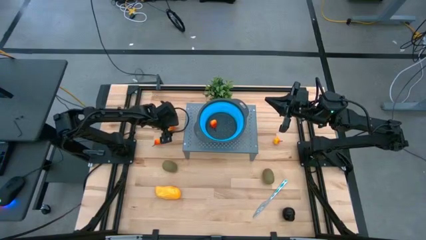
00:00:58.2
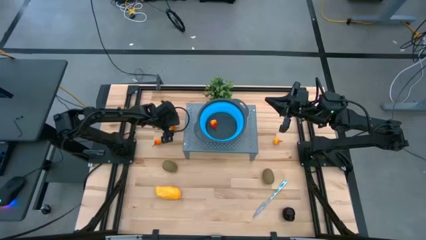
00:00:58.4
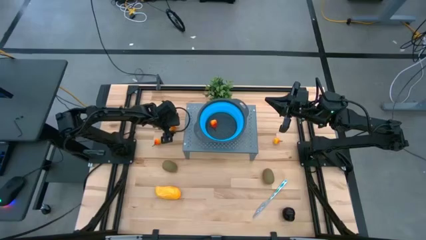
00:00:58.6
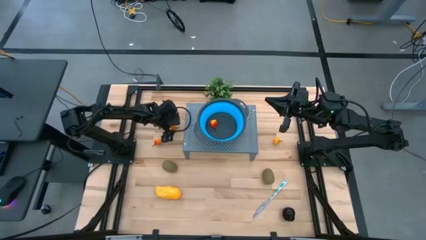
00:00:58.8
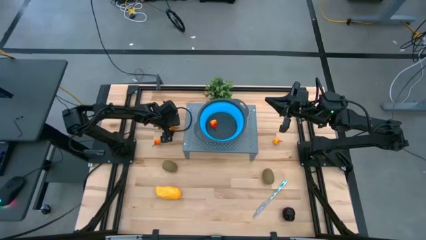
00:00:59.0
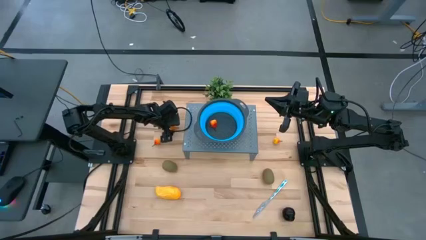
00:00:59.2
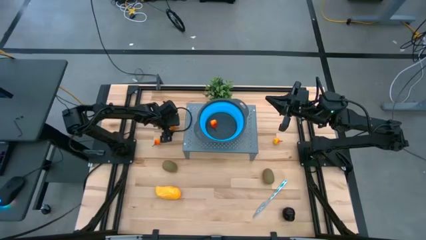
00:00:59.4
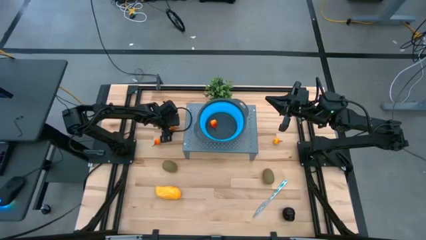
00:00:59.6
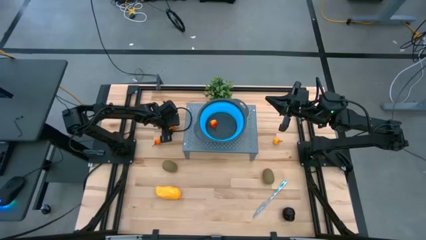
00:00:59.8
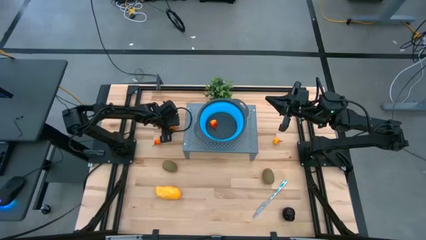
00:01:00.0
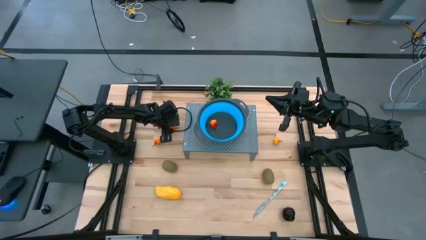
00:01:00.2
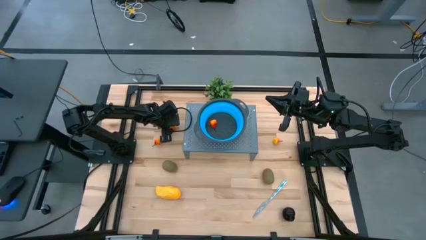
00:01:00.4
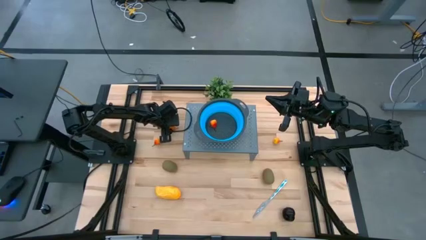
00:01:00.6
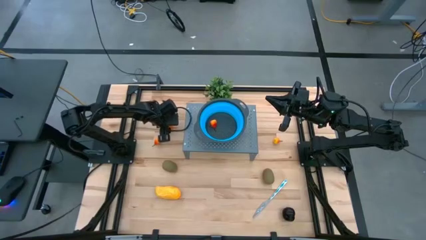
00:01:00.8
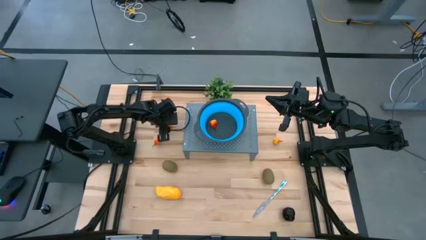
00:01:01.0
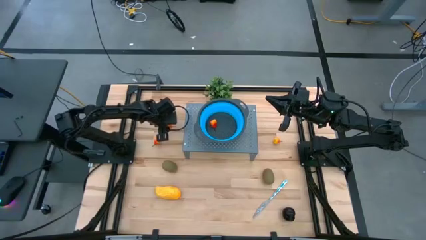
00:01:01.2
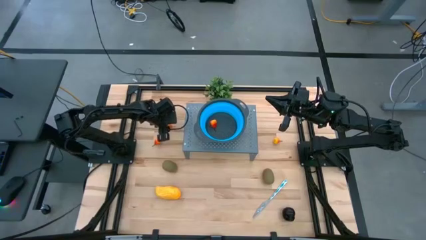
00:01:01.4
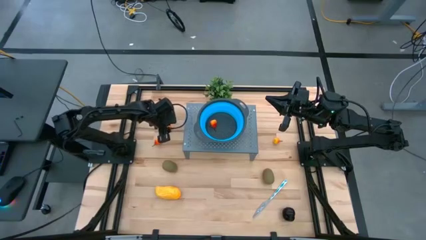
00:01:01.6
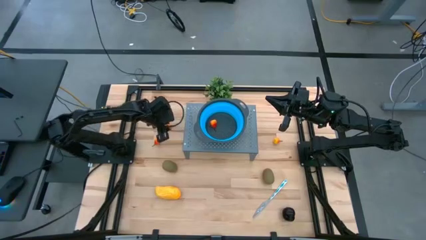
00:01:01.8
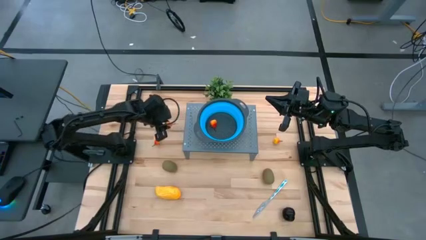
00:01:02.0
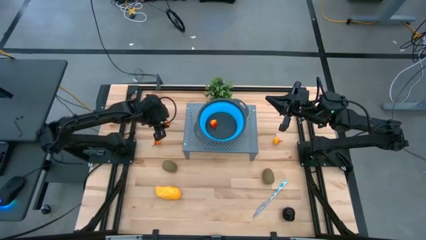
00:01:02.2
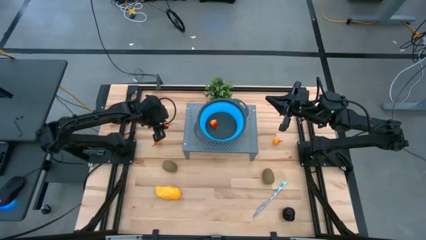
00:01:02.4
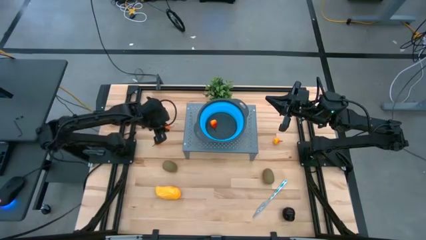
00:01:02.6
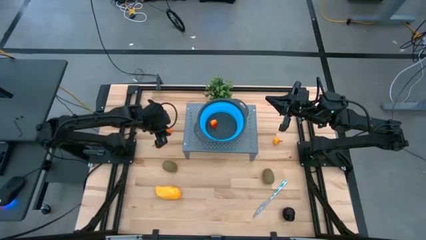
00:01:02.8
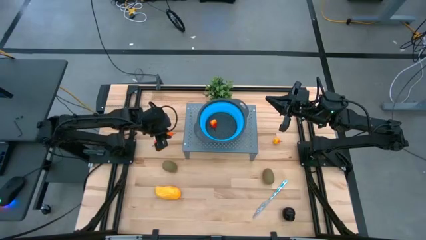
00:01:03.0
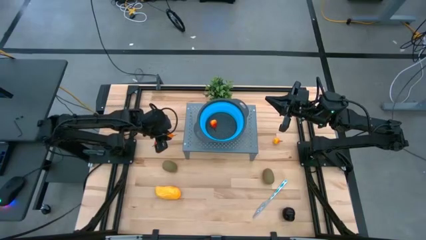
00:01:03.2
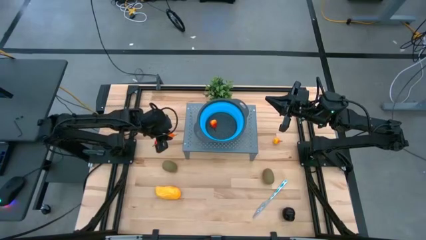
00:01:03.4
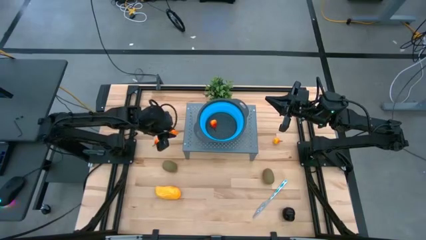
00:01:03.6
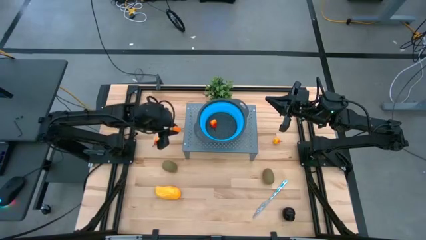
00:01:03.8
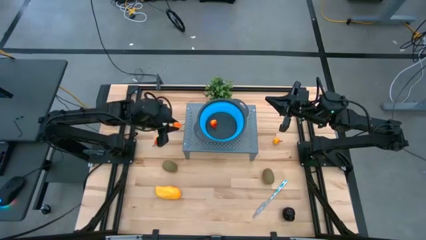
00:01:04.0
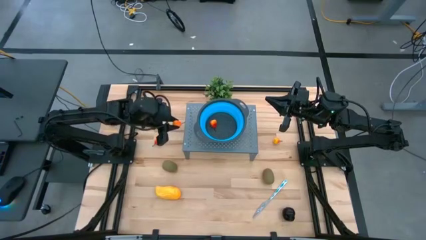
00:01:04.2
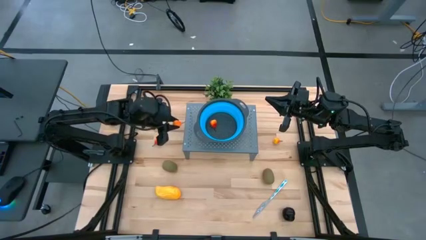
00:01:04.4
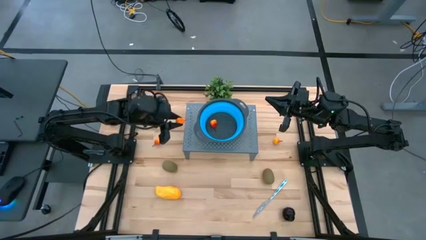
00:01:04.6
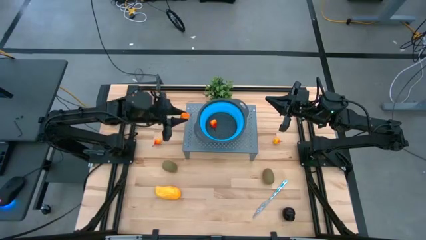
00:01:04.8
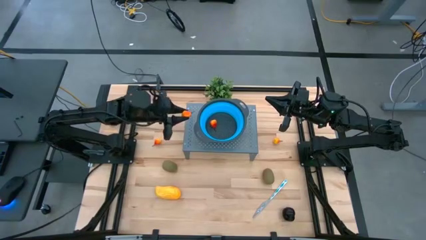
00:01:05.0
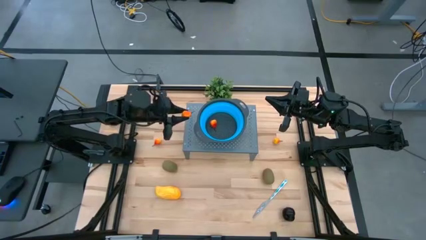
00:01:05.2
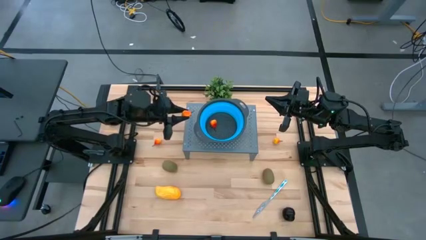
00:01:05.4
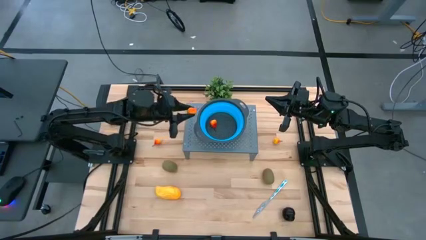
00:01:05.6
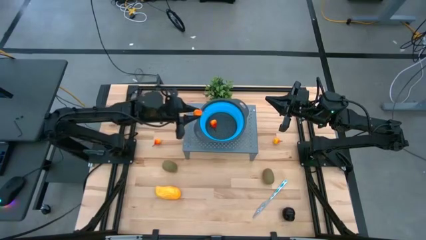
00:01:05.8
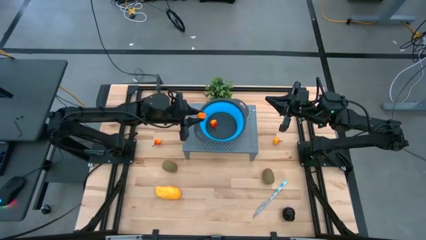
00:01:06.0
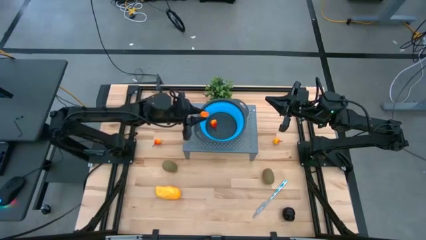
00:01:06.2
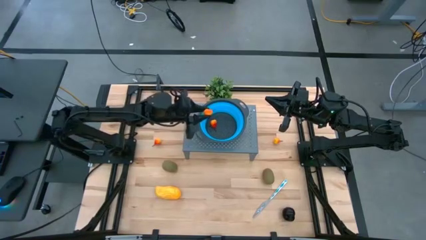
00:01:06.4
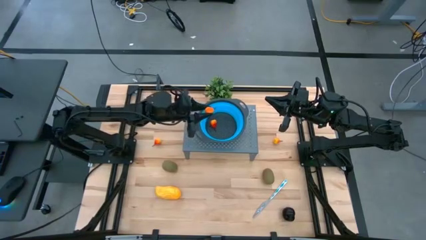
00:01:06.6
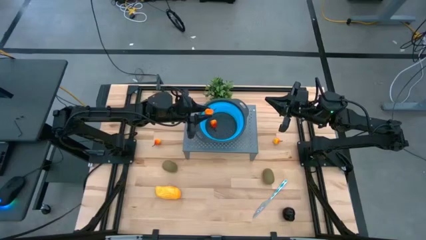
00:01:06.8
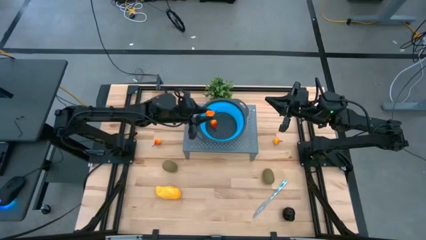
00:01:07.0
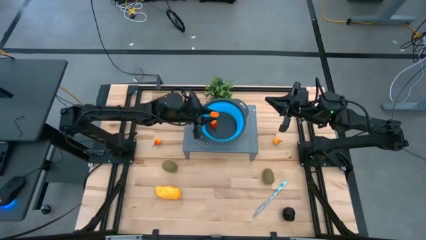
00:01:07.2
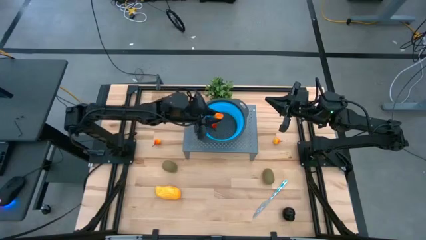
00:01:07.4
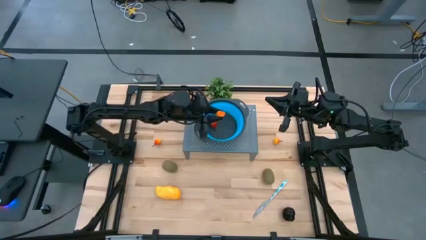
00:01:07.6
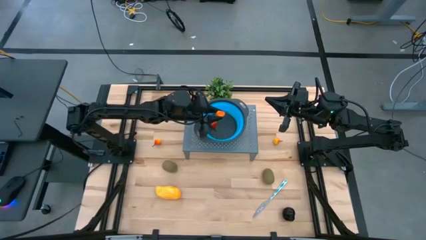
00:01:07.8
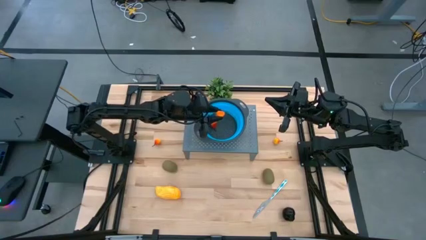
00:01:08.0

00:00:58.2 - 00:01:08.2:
Task: Pick & Place Fruit
Put the top left orange pear into the strainer bowl on the shelf

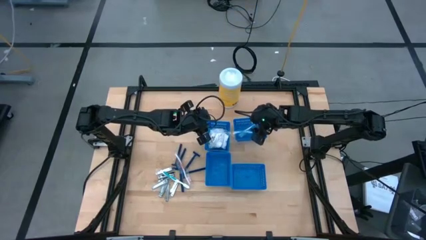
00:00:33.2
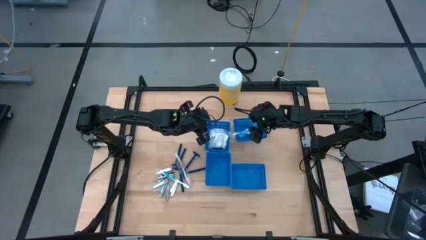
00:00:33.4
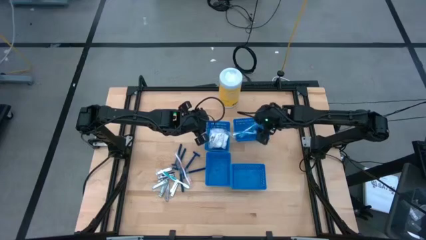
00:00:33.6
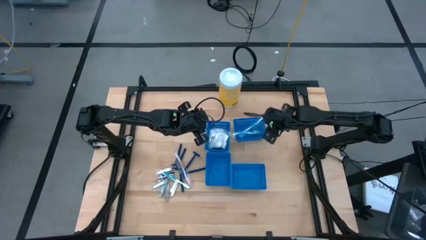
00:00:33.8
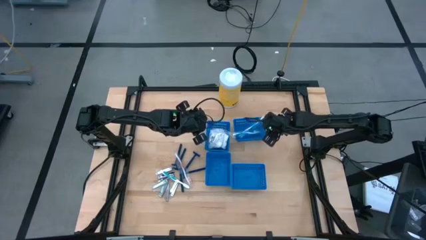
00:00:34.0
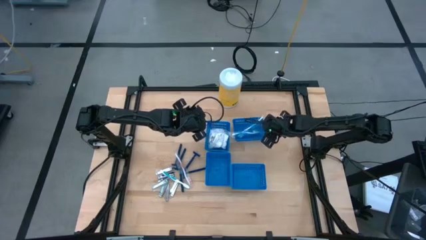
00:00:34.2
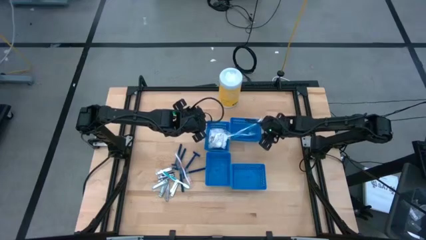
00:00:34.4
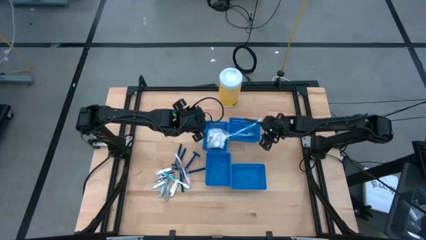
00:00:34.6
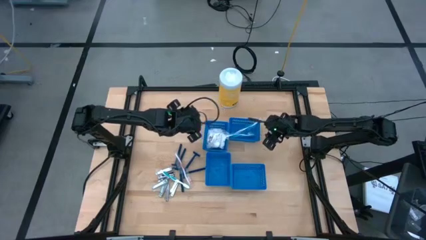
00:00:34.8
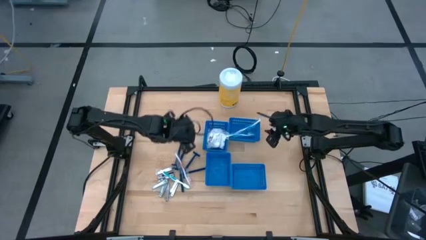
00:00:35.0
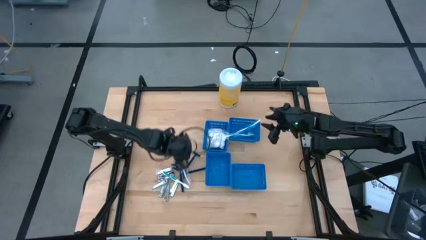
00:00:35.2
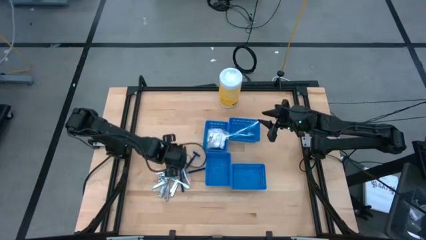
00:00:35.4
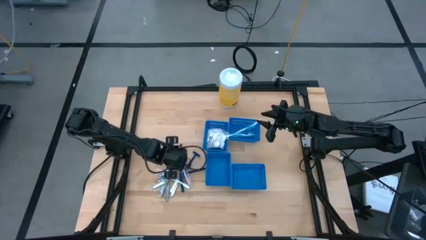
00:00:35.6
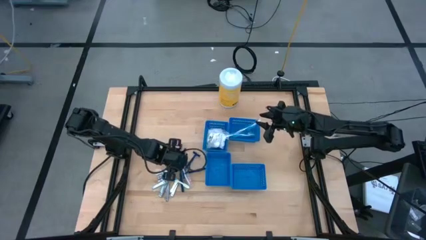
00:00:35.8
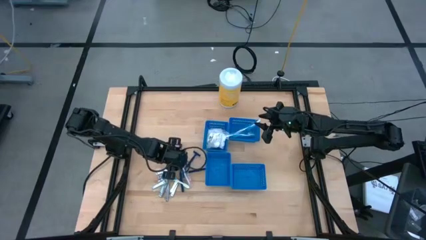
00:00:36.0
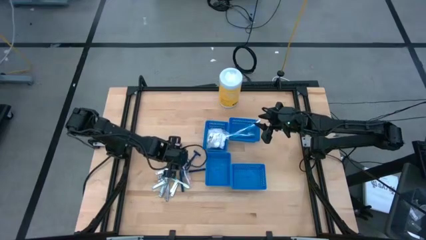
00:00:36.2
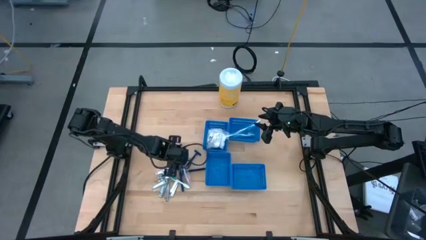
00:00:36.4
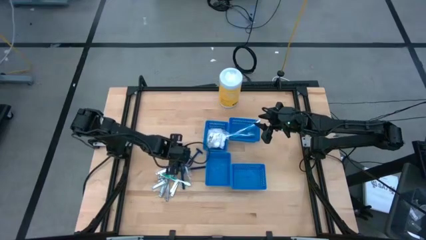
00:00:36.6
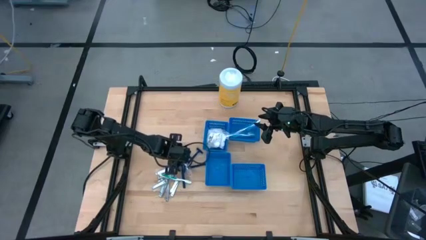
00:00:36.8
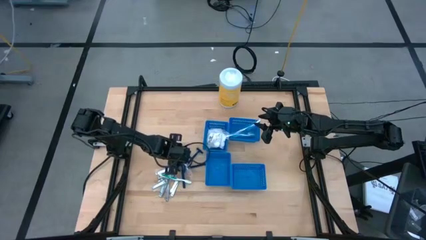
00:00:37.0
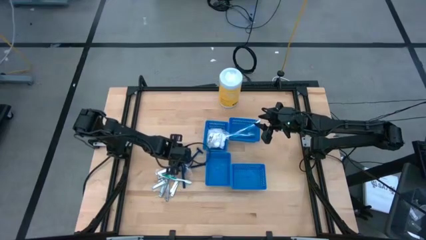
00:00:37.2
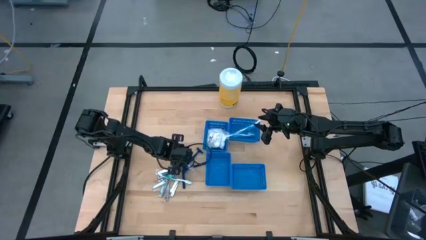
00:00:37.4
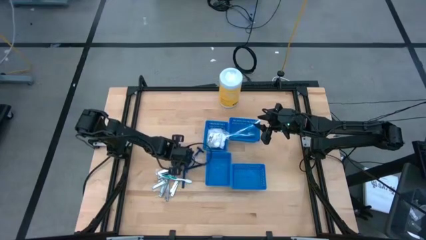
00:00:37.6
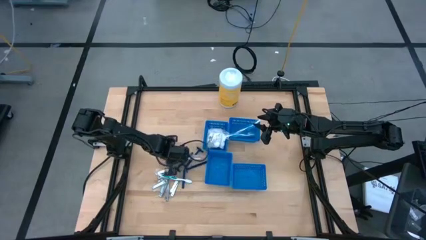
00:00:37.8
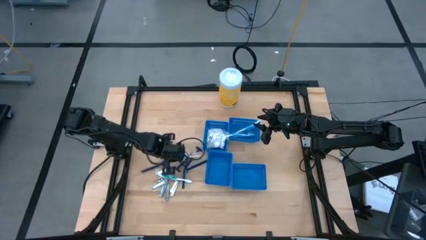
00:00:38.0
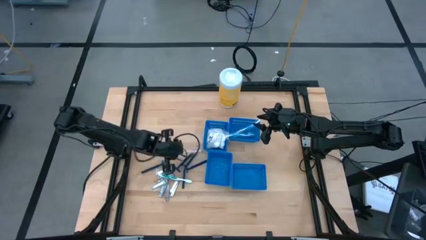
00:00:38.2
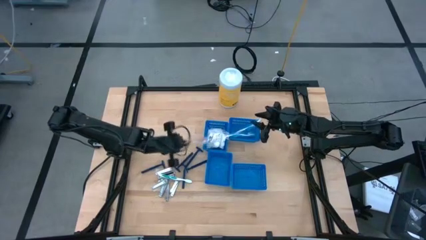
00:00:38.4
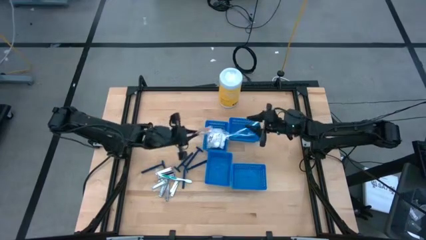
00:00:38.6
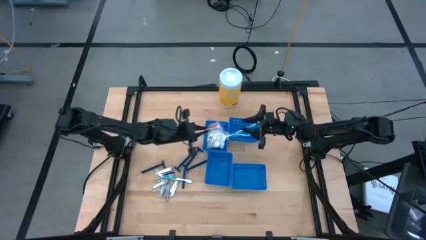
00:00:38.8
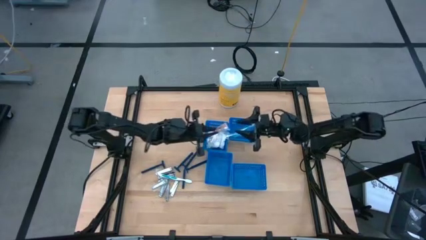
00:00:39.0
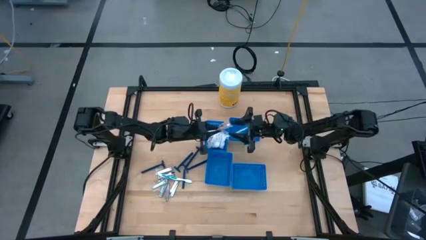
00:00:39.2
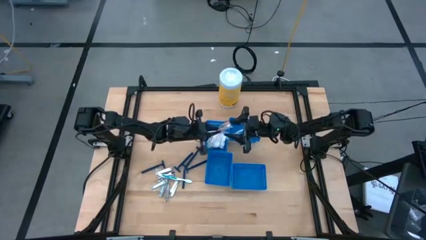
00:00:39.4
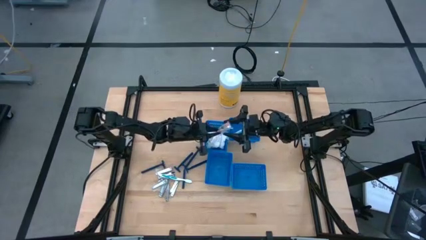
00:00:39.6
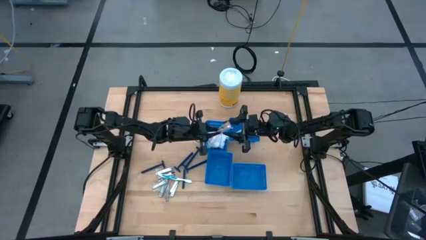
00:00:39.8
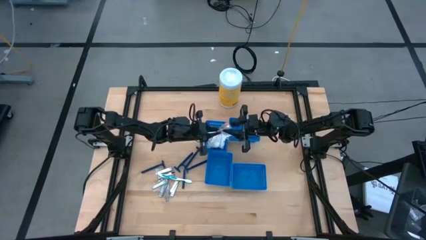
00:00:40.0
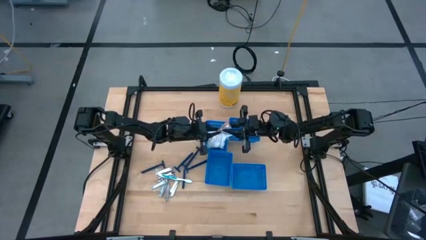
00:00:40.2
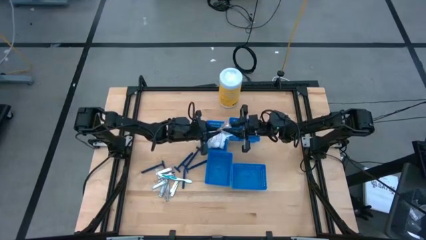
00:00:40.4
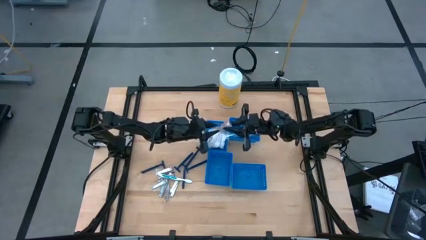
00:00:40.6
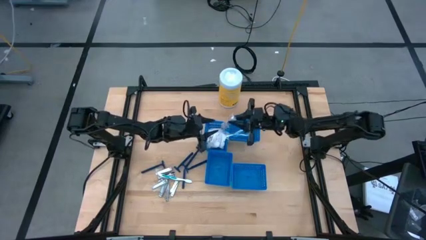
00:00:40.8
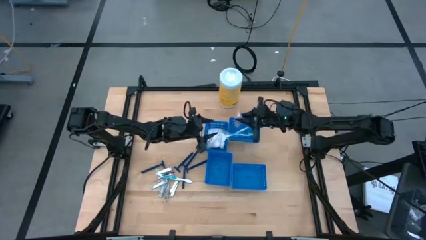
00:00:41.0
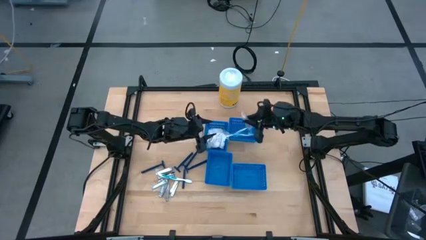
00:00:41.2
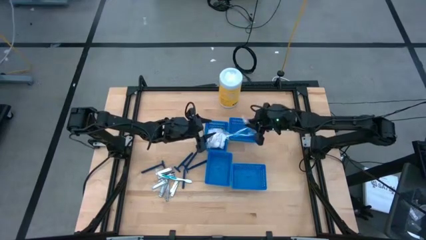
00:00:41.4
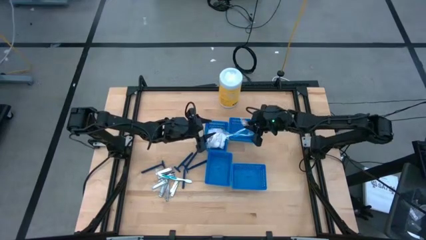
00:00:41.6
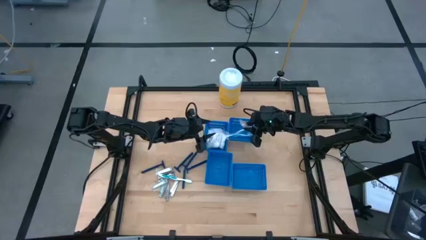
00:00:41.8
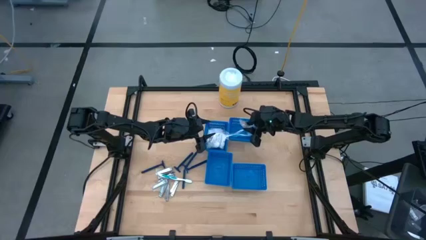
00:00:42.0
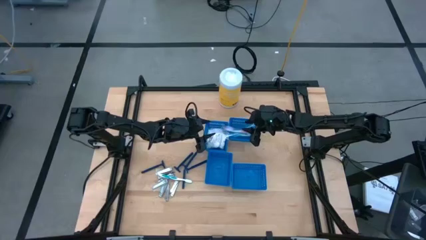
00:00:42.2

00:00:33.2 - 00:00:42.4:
Task: Pick & Place Travel size toiletries
Put the red toothbrush into the top right blue bin
